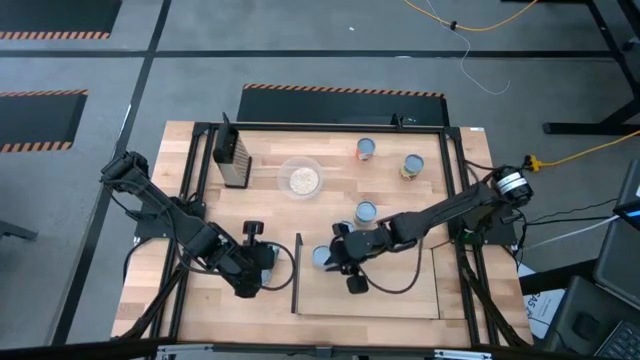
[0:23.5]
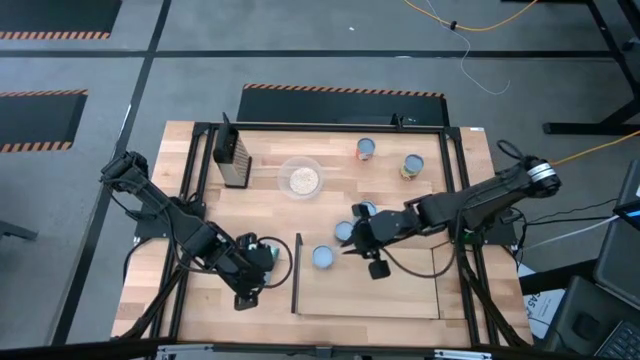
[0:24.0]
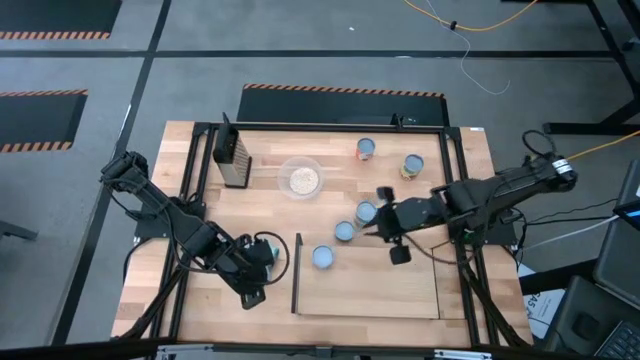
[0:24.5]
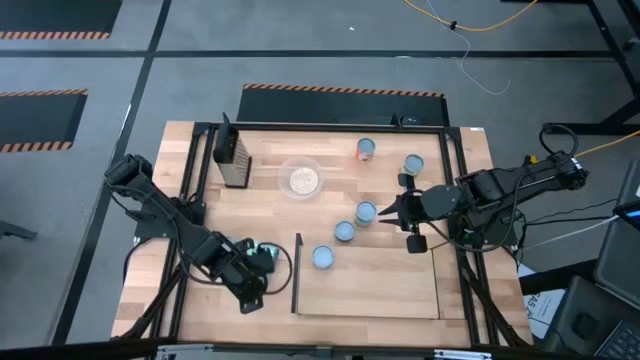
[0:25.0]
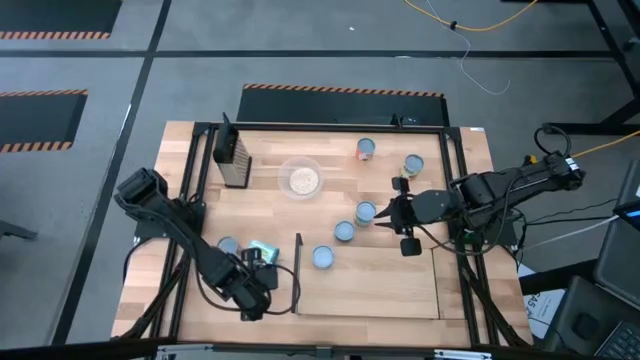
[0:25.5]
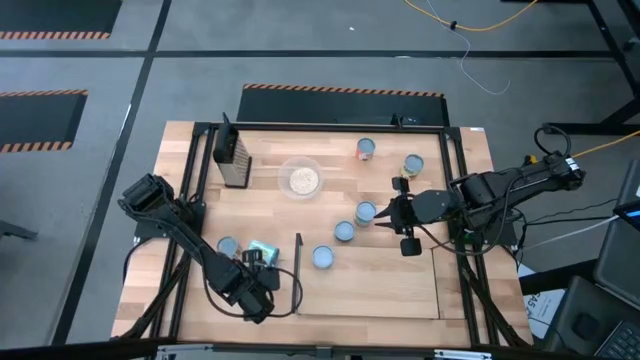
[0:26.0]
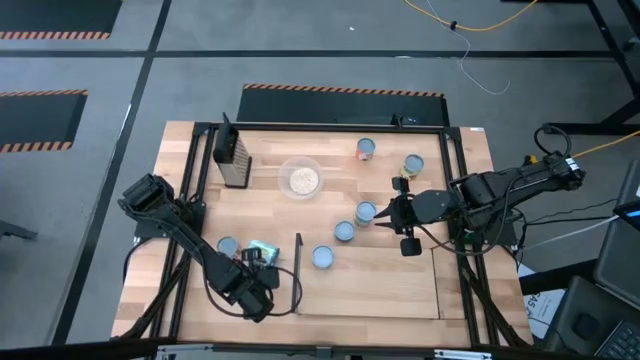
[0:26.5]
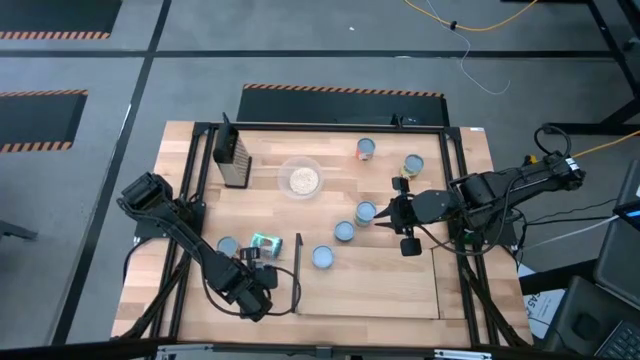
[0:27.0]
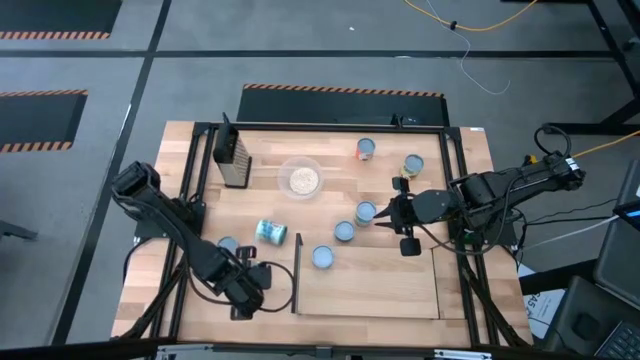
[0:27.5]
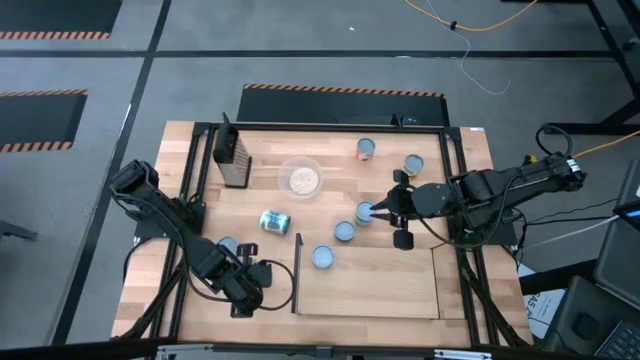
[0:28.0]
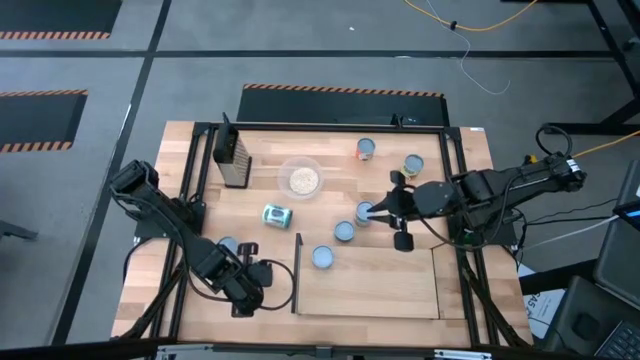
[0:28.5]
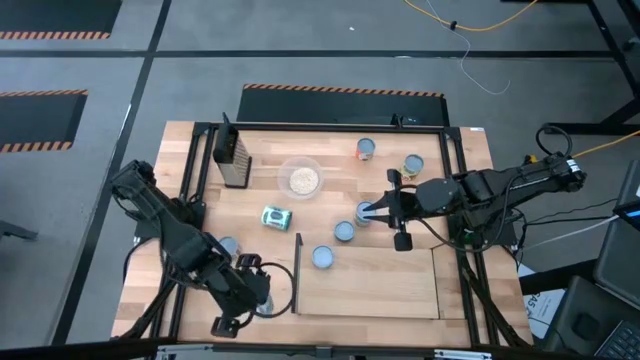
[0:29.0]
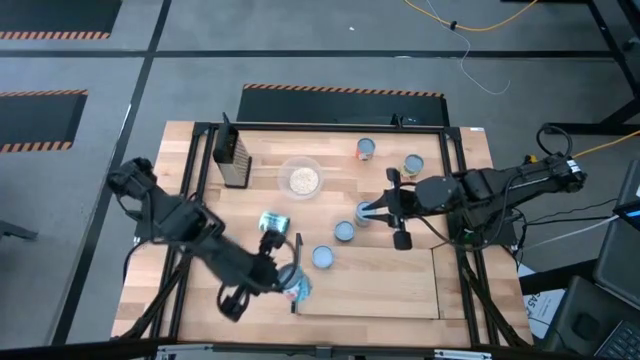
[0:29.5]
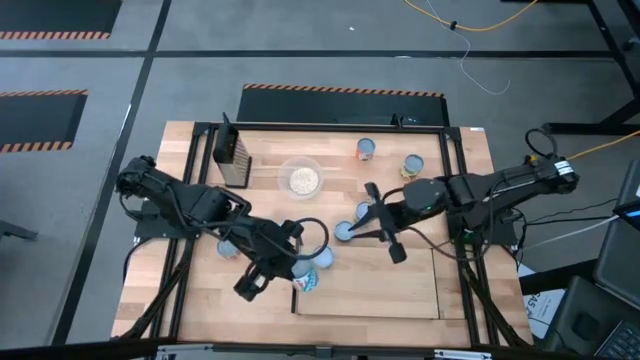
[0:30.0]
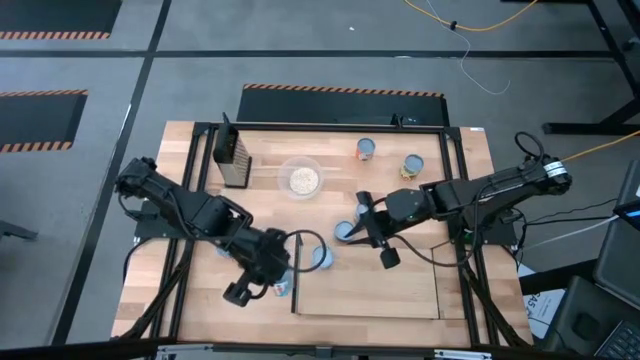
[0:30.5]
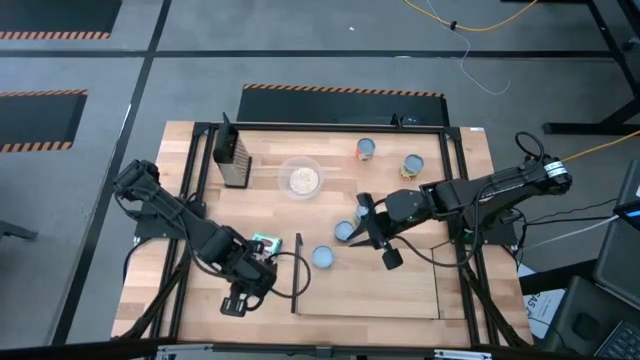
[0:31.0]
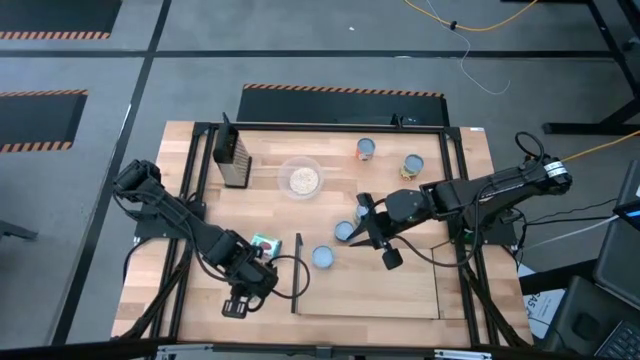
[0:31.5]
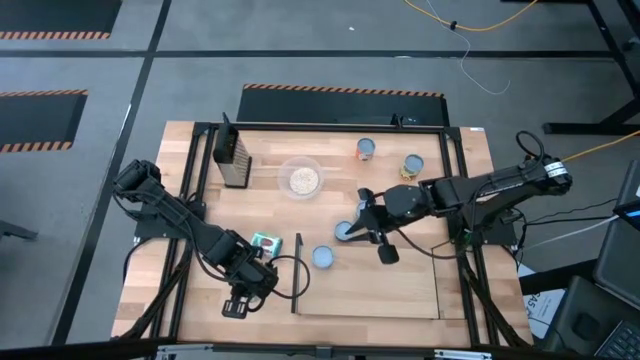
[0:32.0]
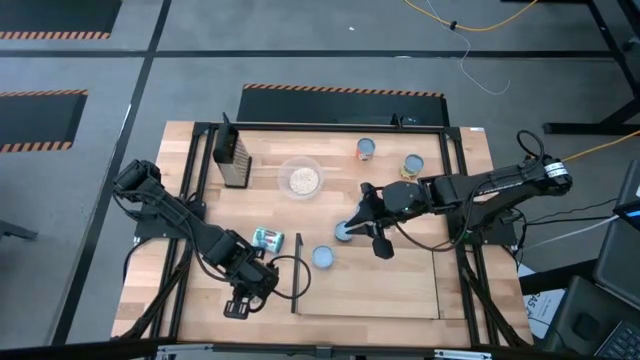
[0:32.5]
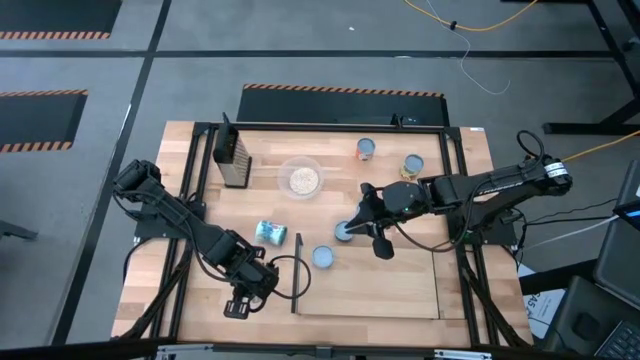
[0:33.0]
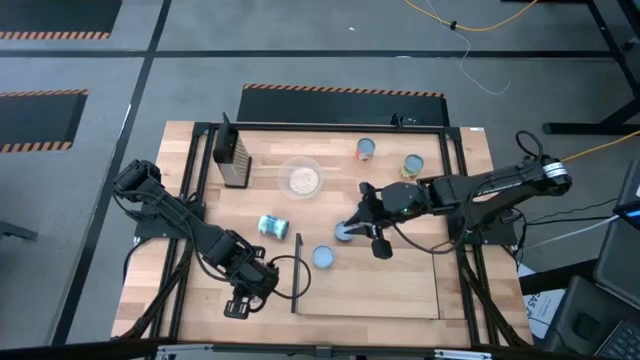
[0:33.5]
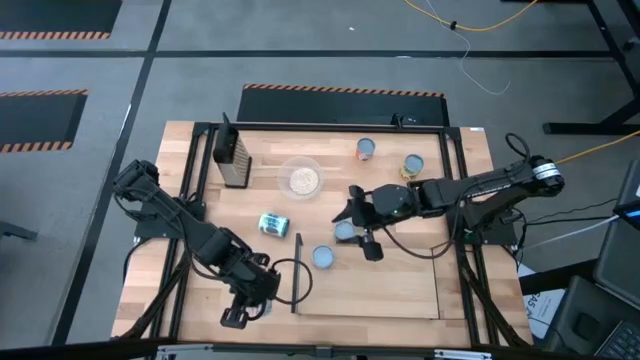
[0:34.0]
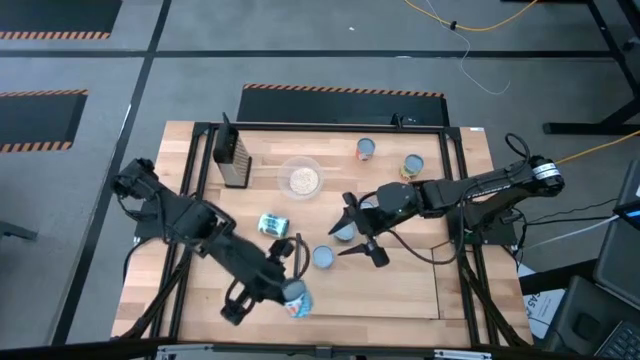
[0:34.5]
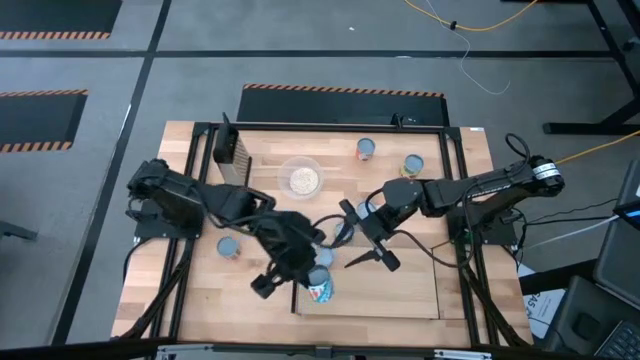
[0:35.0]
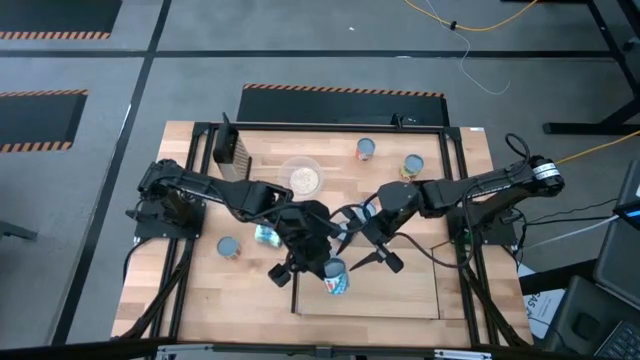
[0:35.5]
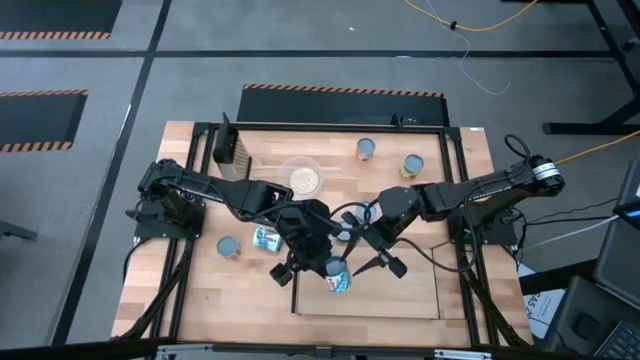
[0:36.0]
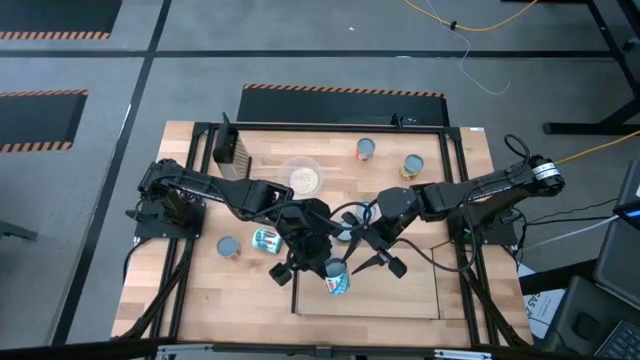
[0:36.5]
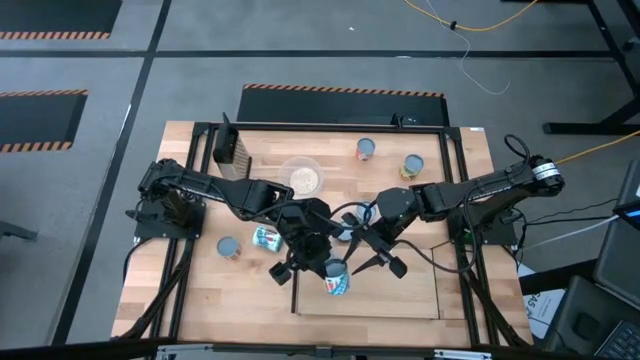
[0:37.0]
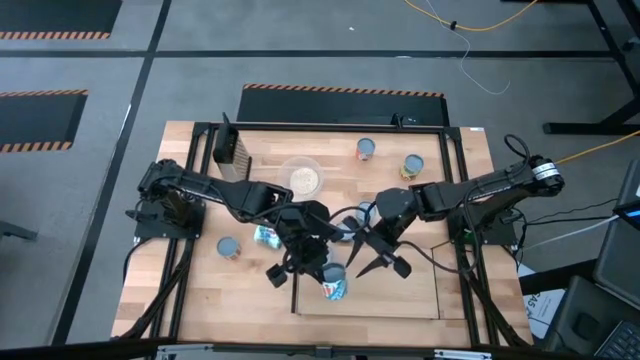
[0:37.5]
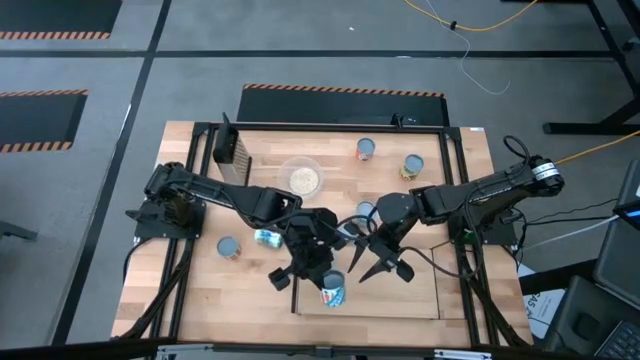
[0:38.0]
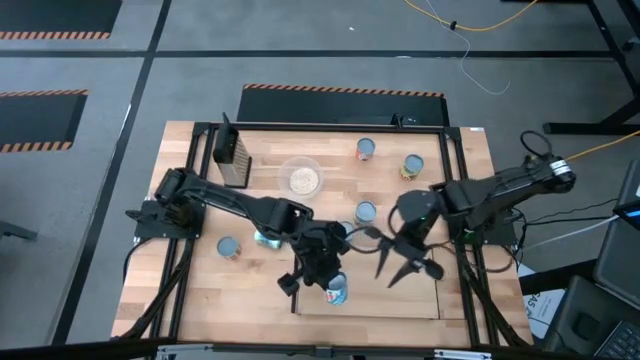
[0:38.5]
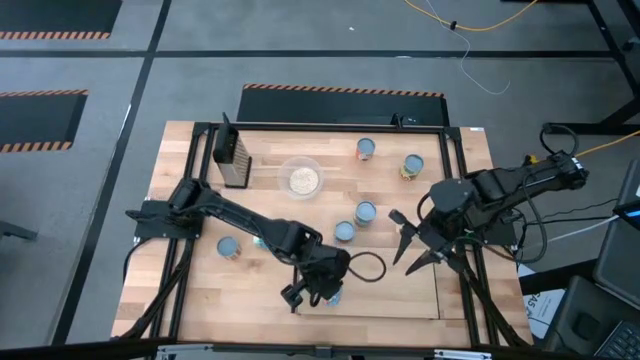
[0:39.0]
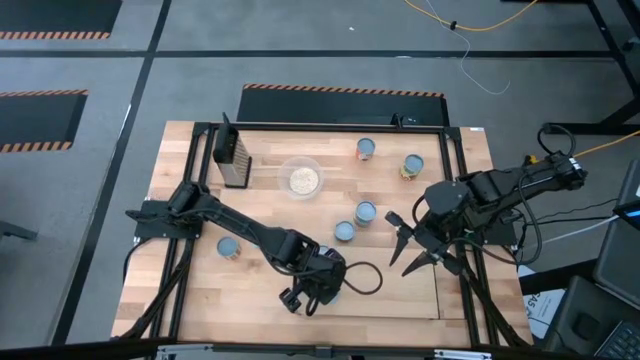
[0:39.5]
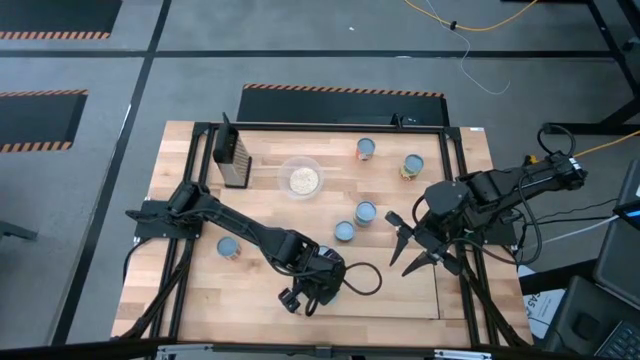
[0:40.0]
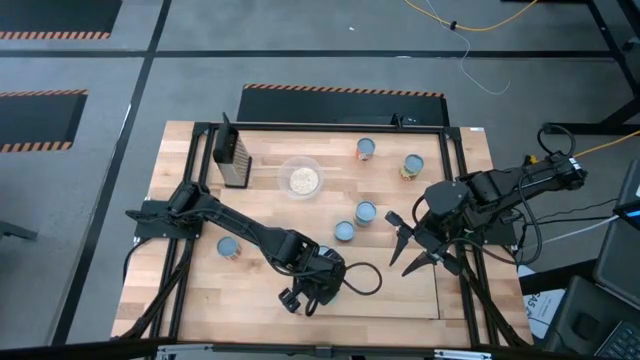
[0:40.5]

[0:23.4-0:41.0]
Task: Pick and place cans onto a shelf
Put the canned carrot on the shelf

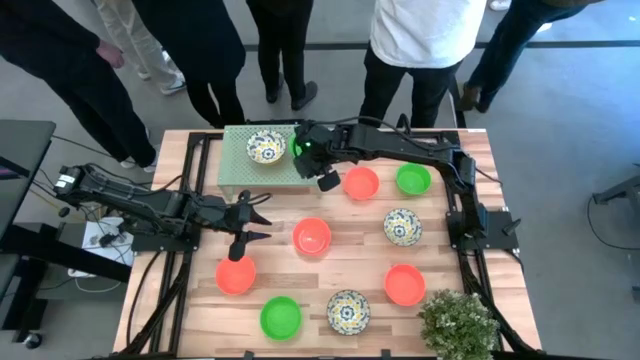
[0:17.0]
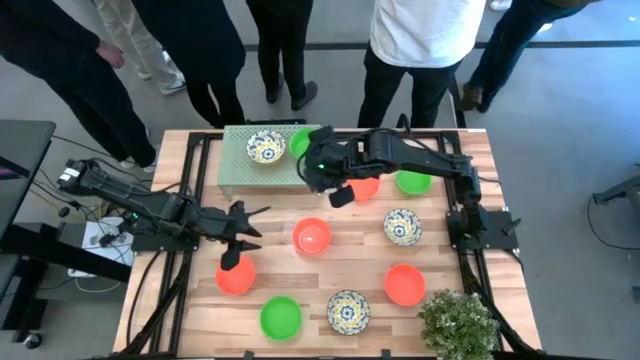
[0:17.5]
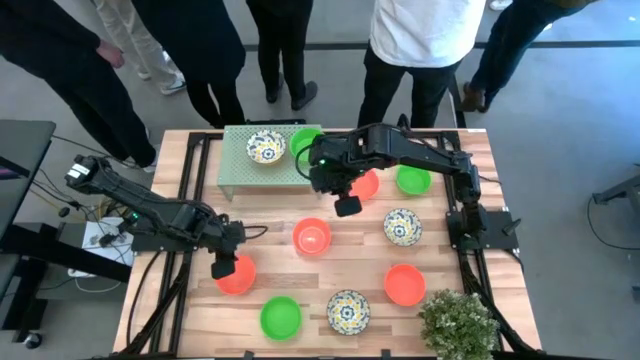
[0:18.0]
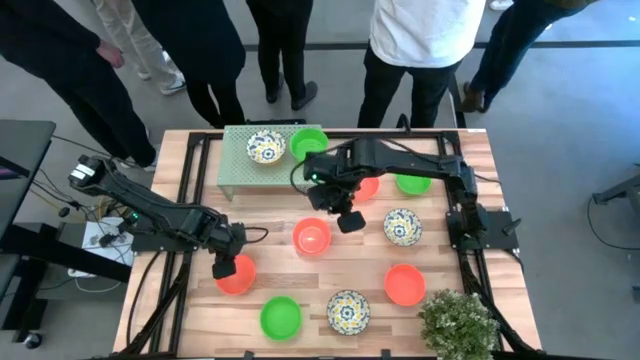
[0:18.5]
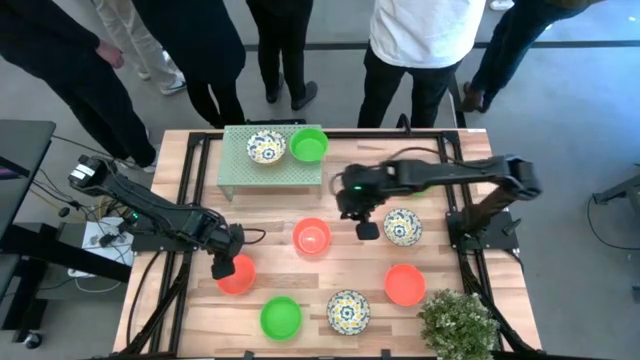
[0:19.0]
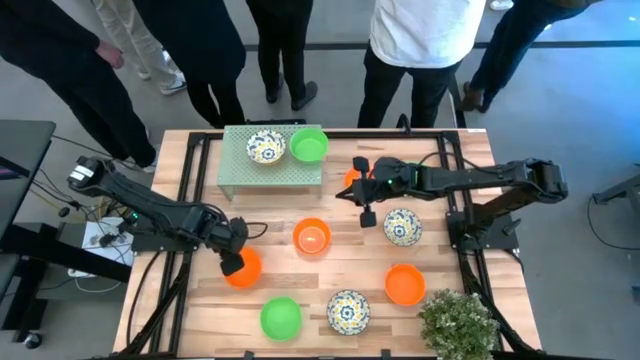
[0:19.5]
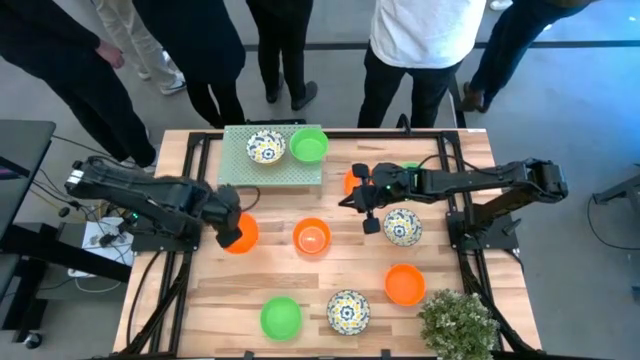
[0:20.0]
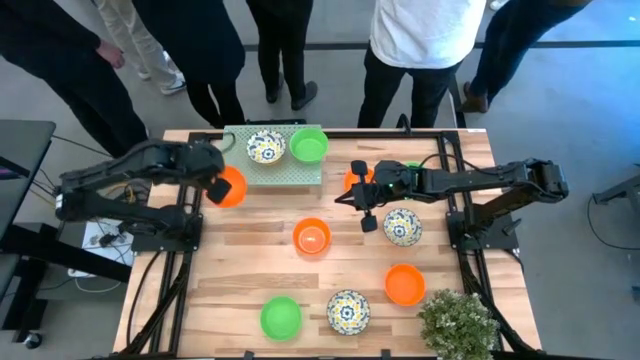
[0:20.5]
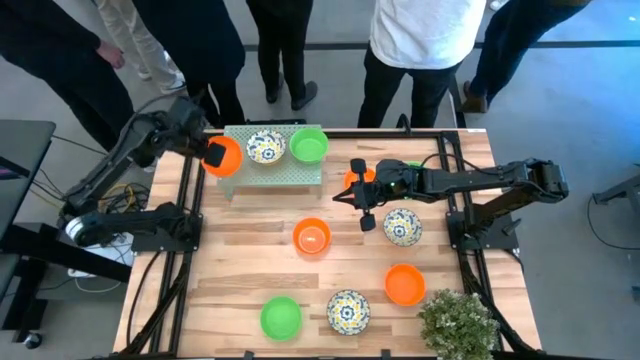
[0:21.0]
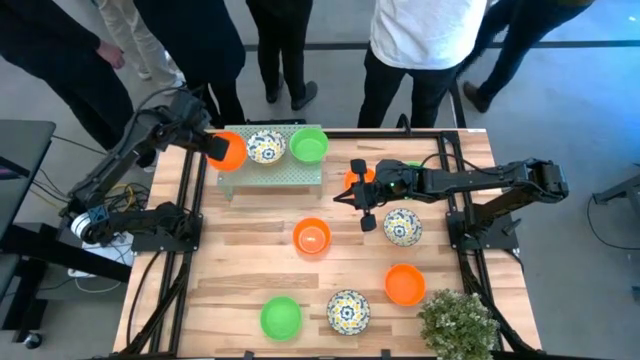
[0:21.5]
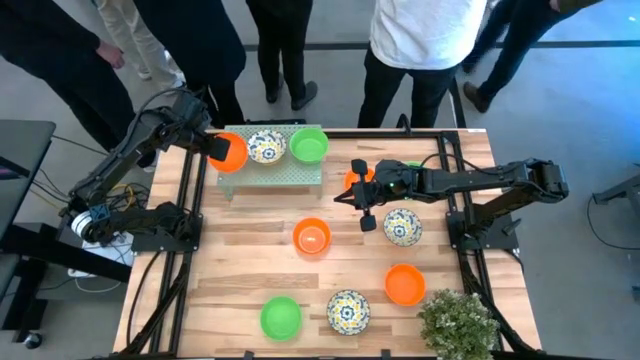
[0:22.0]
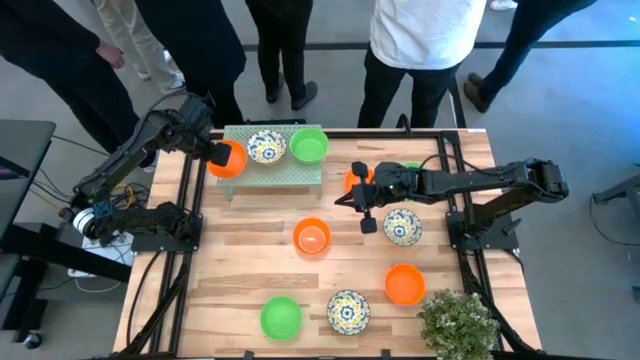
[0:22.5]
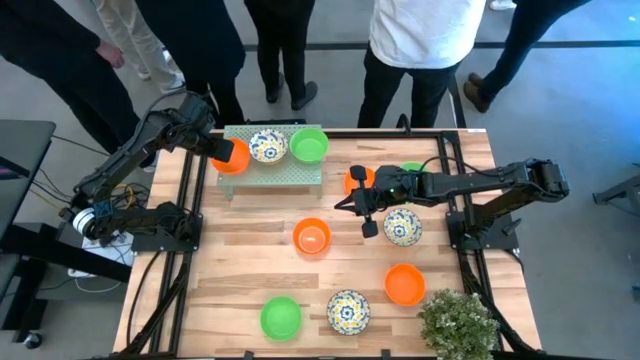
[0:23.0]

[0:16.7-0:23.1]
Task: Pick & Place Mini bowls
Put the orange bowl on the shelf
